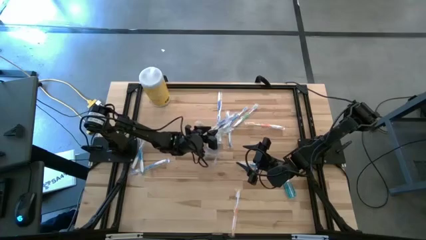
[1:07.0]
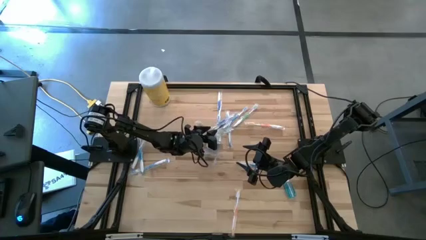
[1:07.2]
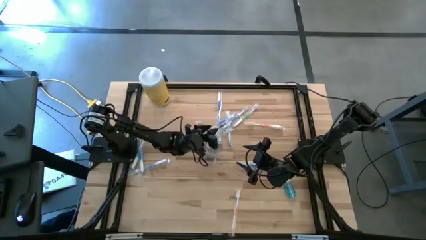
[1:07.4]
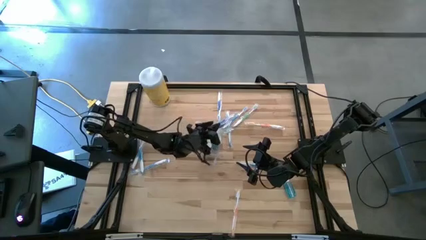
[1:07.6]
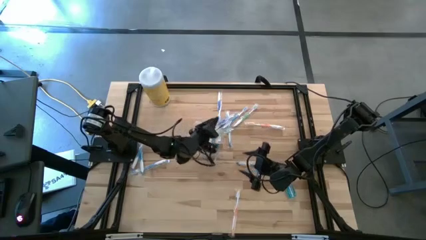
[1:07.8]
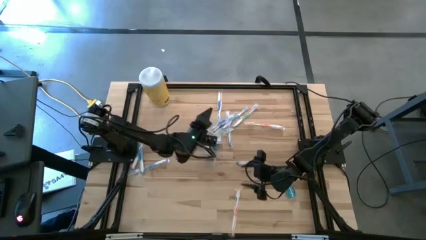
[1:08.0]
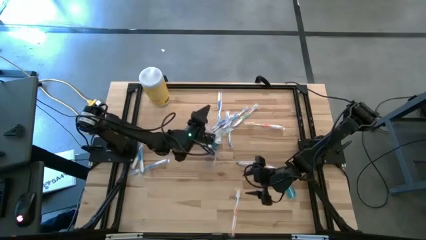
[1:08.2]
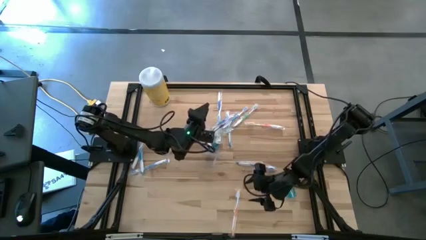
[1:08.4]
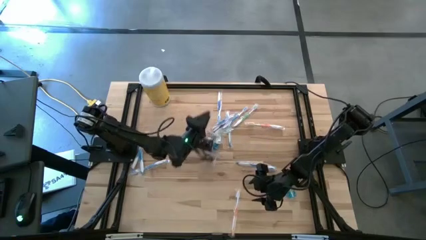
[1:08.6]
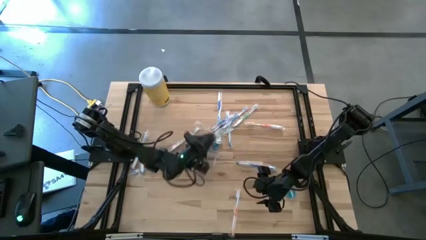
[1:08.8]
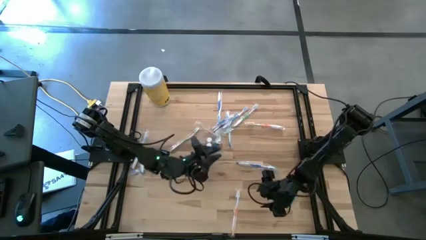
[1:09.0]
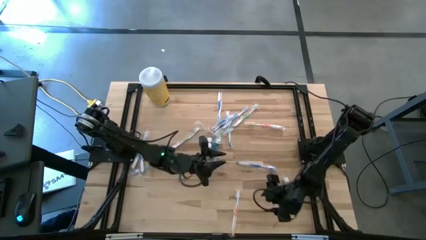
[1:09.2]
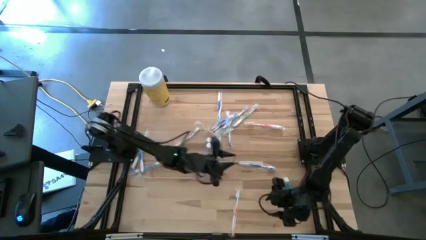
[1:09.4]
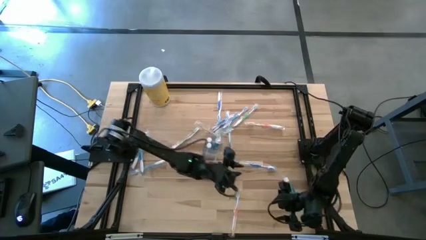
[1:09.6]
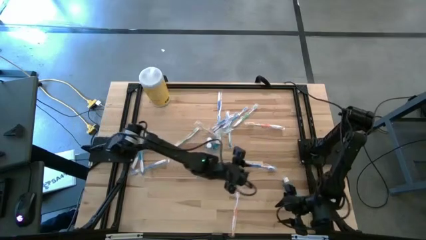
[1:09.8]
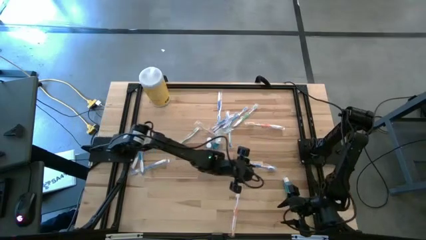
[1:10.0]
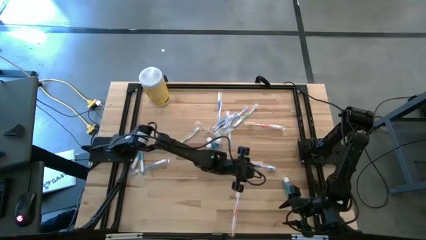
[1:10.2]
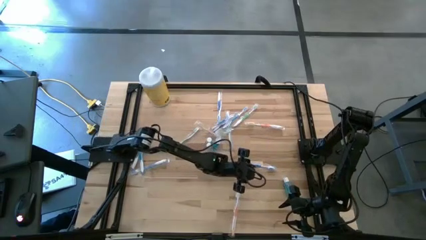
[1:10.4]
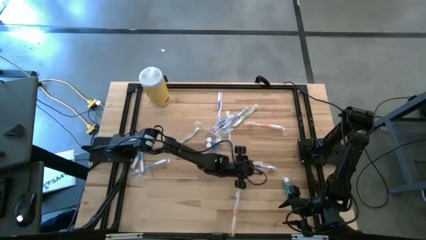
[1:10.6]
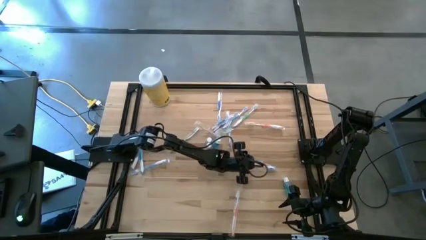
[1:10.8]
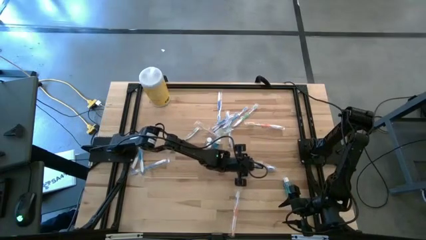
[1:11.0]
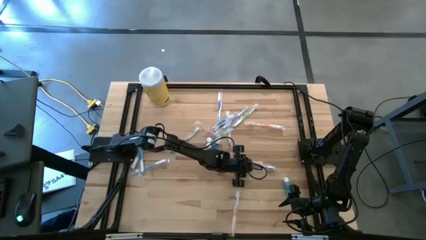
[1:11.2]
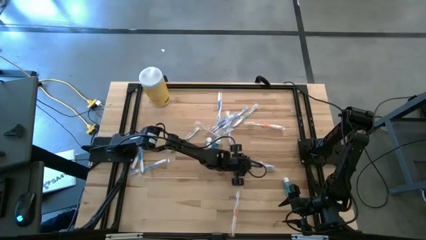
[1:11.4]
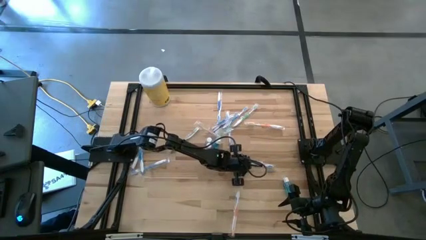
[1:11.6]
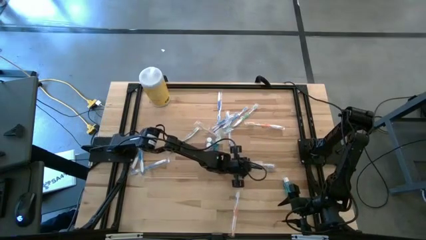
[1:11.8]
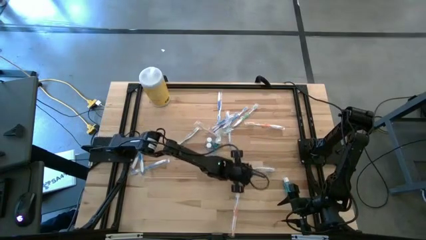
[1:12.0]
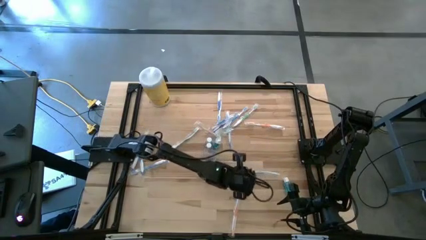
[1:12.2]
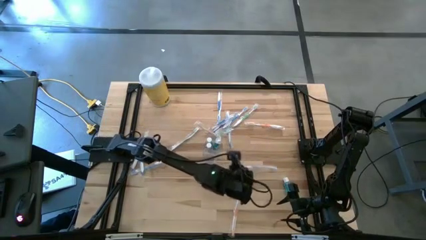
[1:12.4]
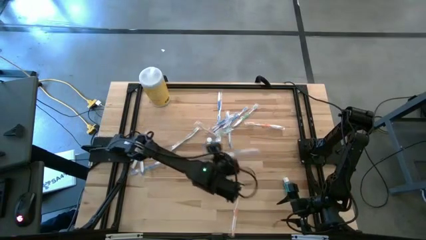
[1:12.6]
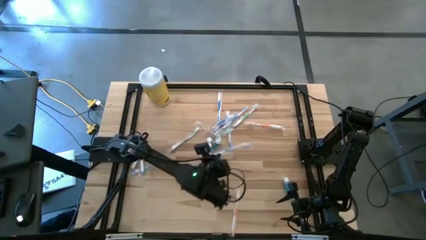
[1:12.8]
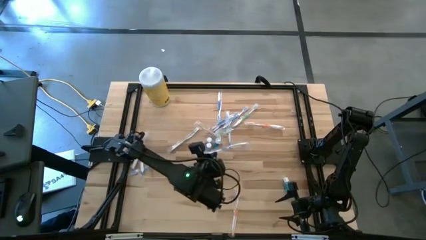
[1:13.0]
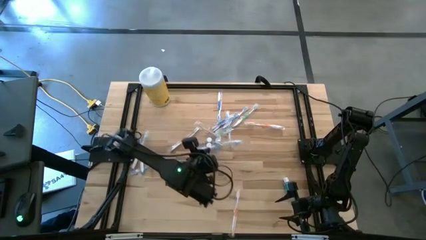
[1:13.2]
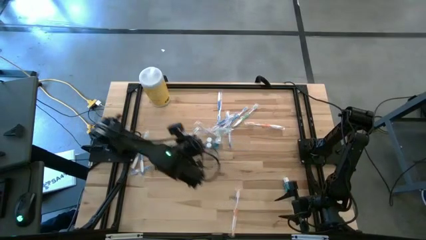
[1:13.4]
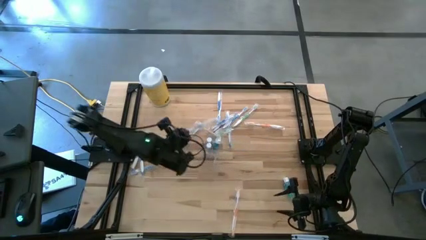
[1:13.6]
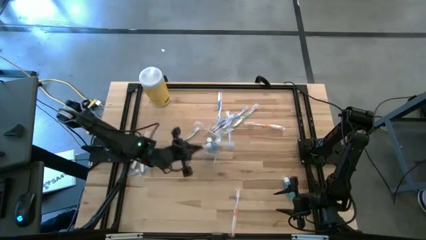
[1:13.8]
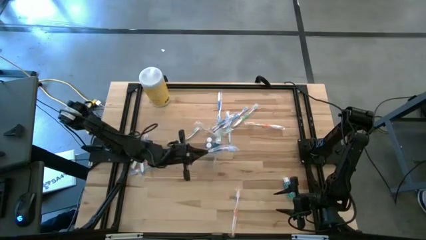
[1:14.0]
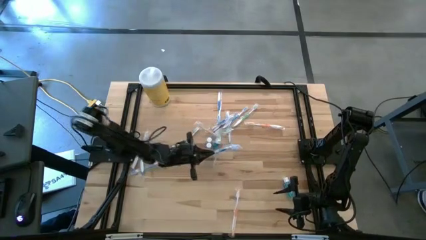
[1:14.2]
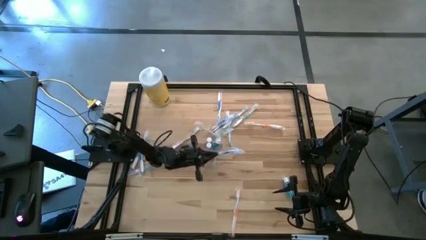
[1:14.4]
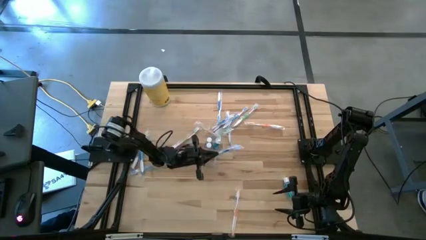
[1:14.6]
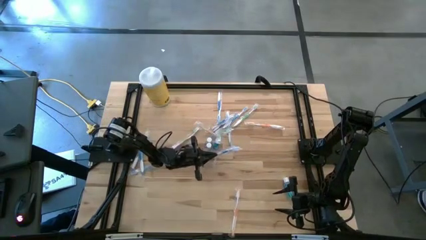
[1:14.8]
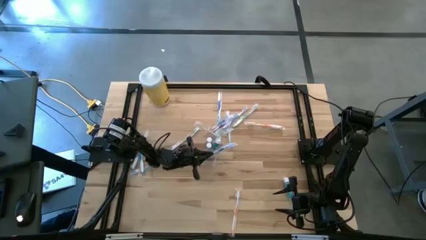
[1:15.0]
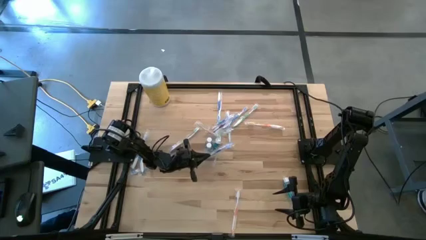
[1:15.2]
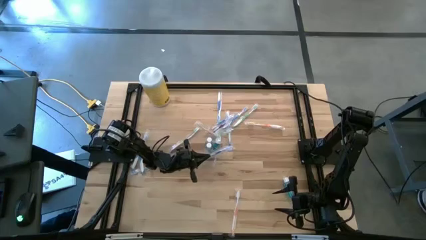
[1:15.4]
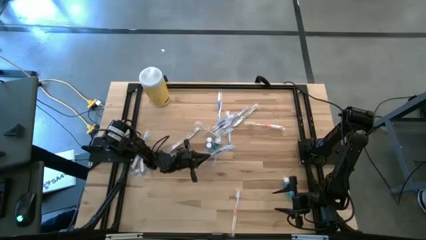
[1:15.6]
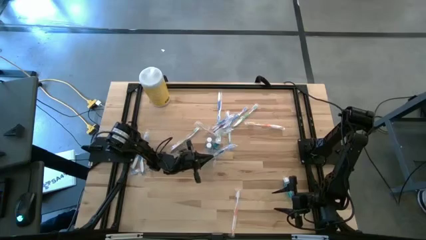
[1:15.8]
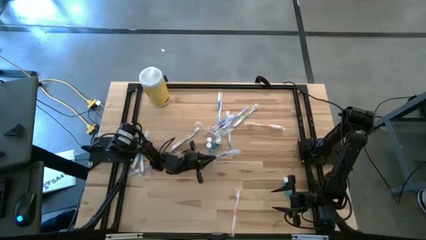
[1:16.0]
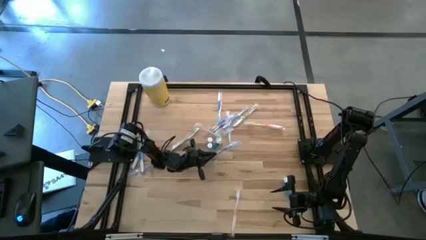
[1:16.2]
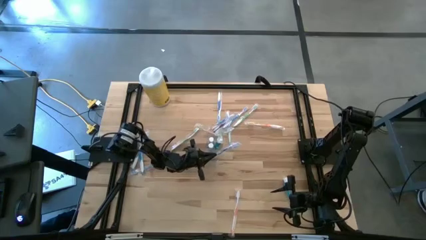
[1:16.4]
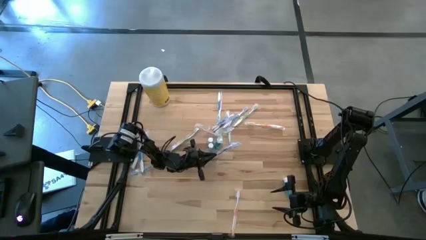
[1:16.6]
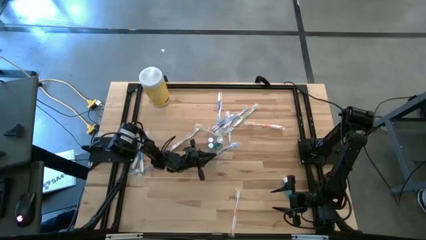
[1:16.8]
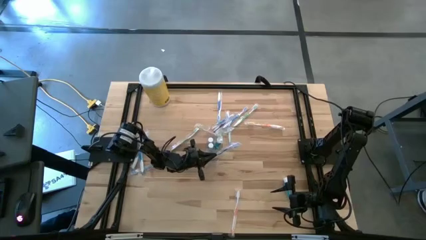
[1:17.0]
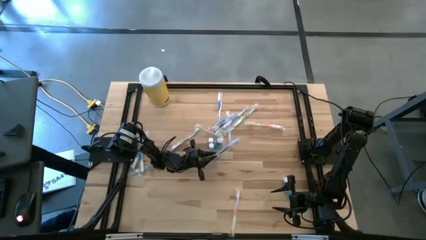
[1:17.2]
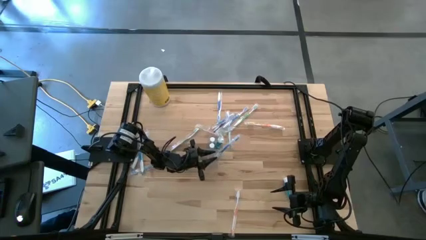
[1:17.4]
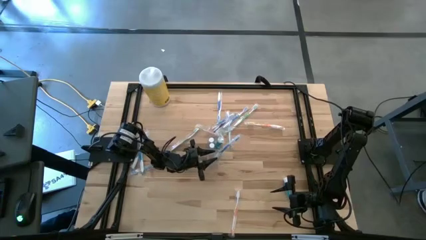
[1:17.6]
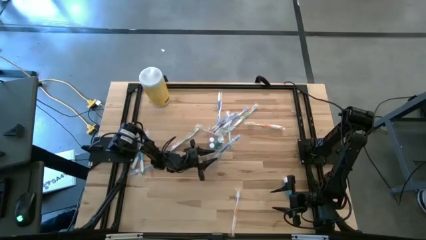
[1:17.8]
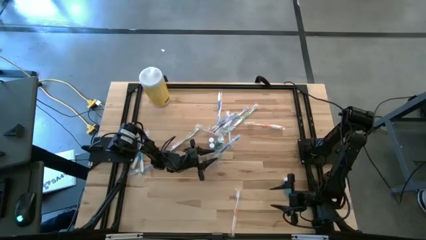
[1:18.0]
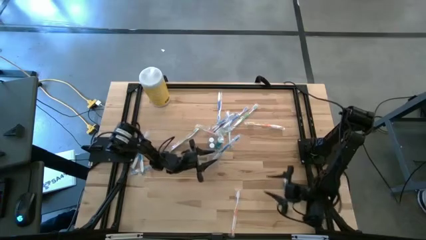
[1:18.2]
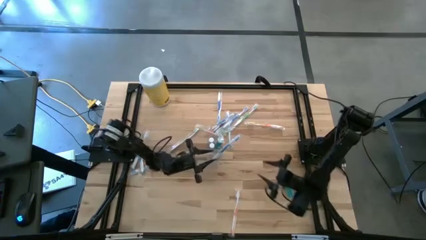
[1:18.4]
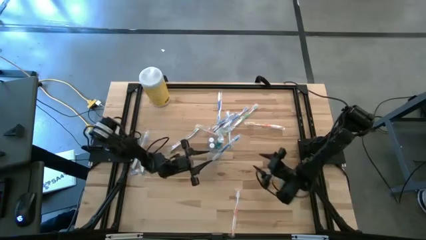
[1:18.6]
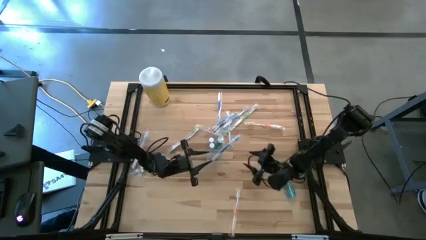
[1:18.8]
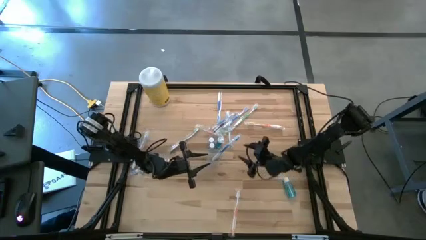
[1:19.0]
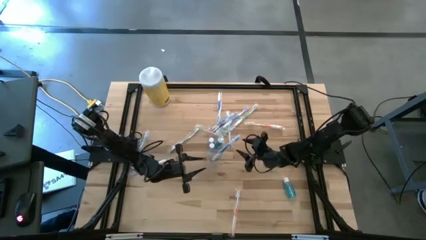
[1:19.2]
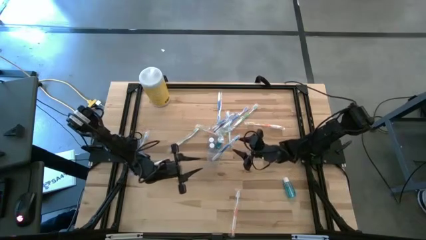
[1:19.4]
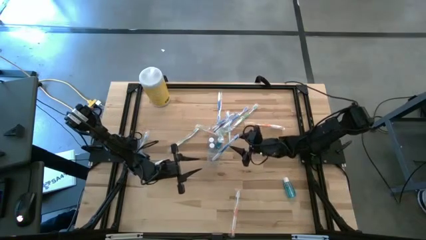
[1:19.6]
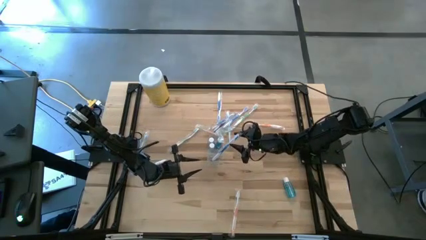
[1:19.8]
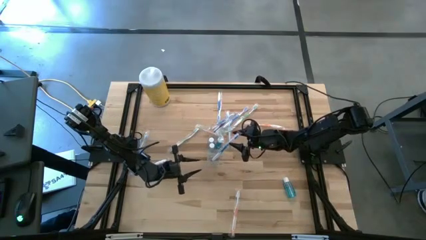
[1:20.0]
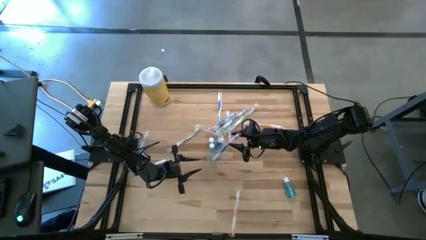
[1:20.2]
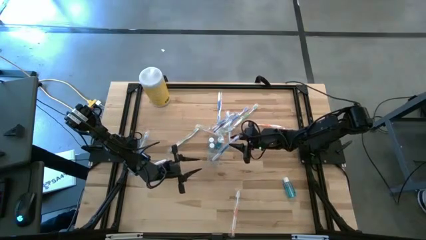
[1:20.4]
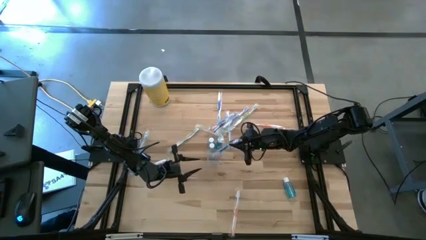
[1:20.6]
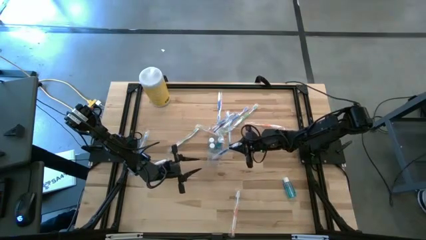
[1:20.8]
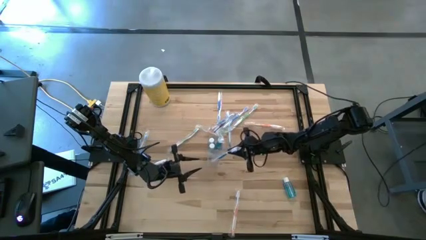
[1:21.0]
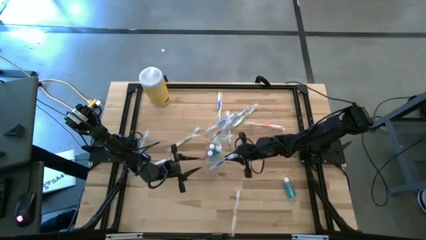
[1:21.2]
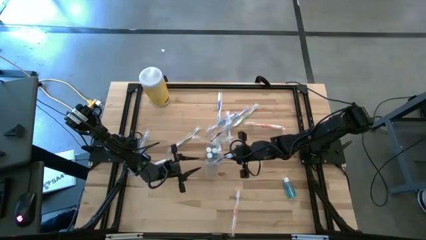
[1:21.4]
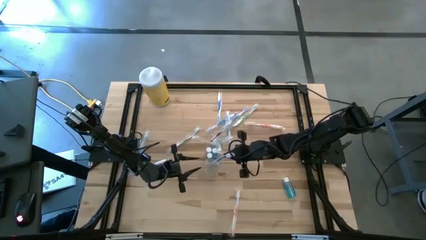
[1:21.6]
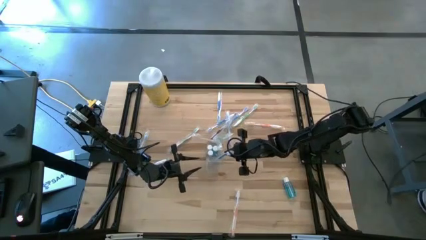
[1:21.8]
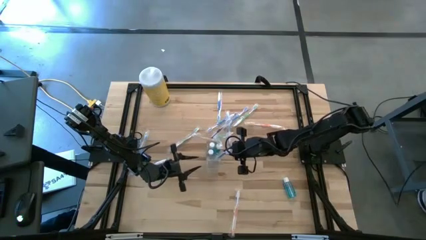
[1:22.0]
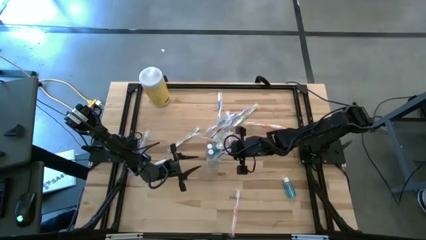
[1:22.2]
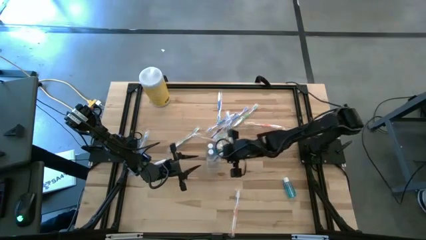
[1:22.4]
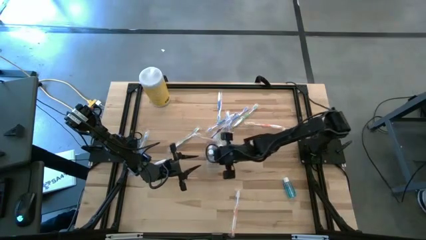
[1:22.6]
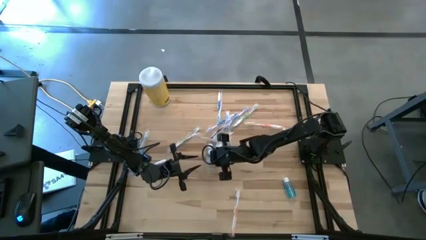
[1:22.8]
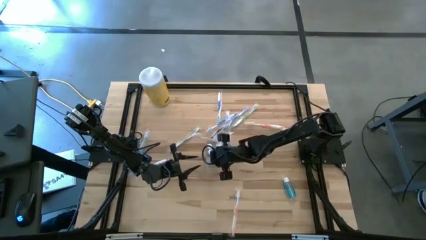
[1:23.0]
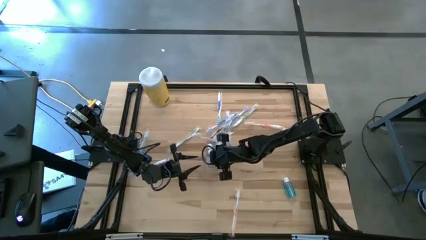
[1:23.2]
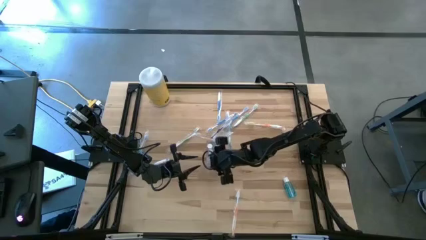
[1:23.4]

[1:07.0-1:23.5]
Task: Pick & Place toothbrushing station
Put the blue toothbrush into the transparent organizer
